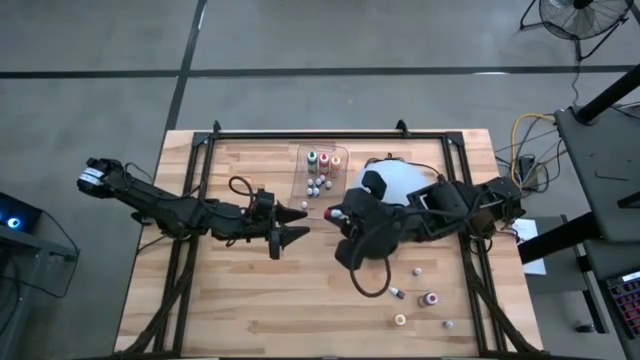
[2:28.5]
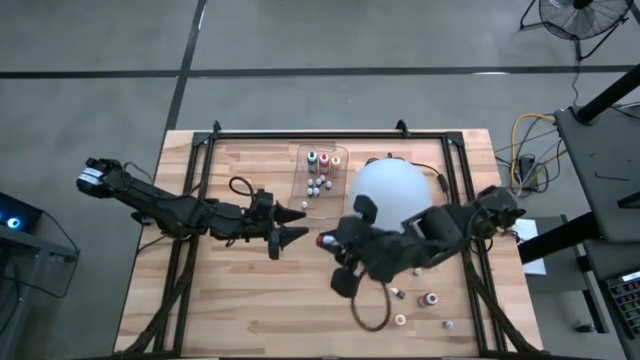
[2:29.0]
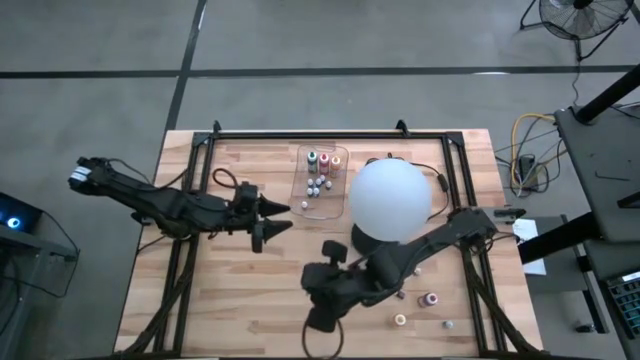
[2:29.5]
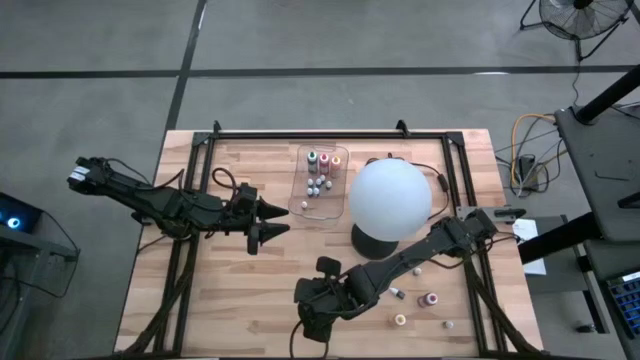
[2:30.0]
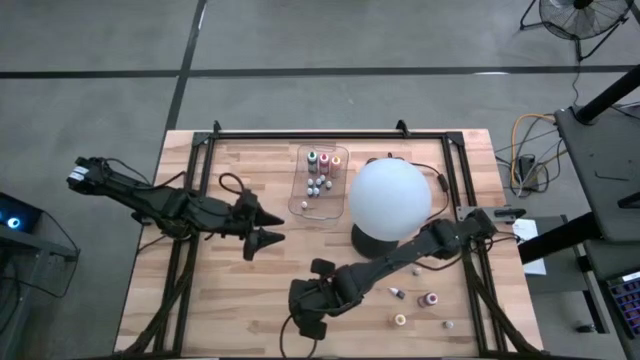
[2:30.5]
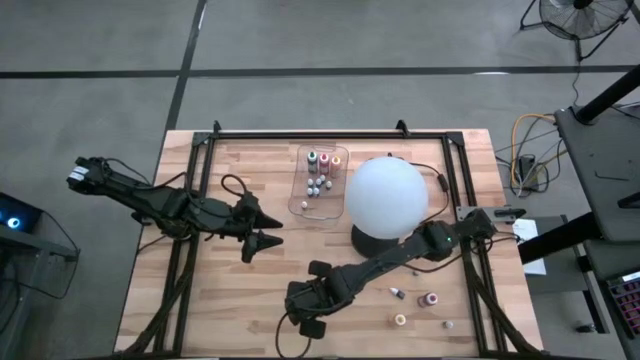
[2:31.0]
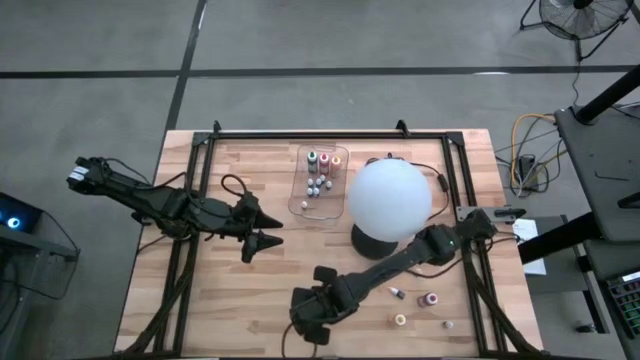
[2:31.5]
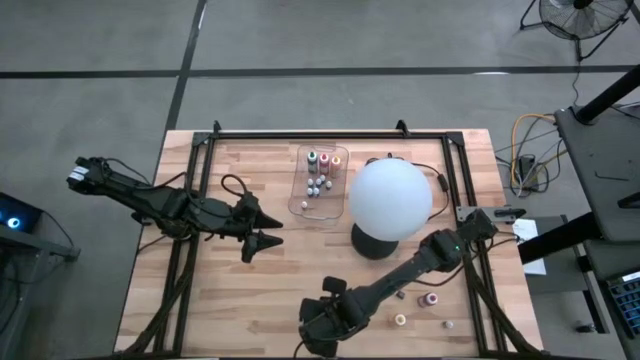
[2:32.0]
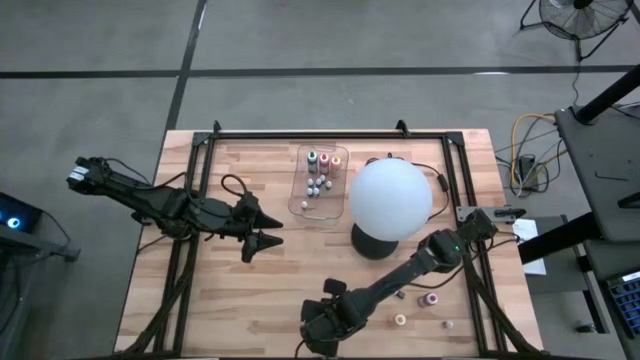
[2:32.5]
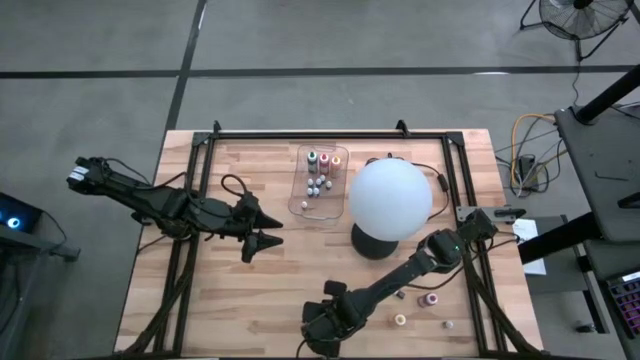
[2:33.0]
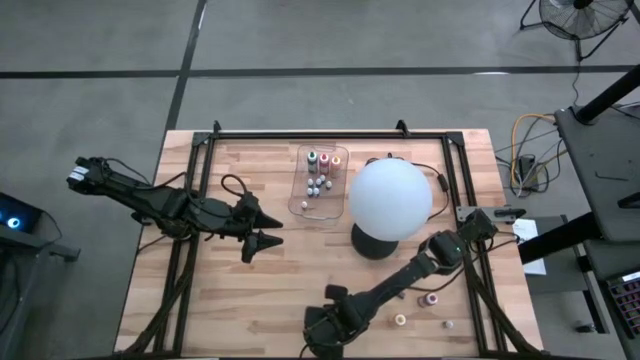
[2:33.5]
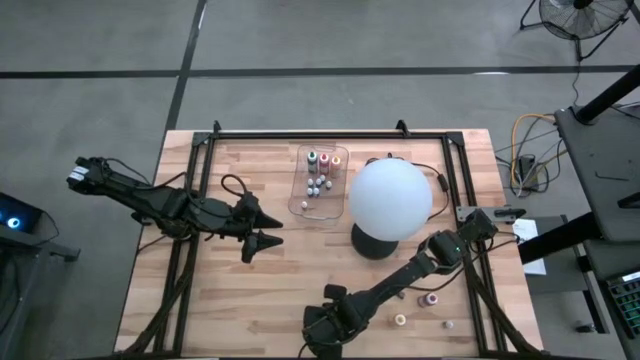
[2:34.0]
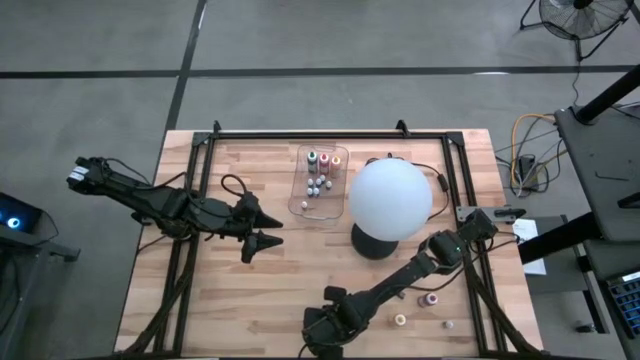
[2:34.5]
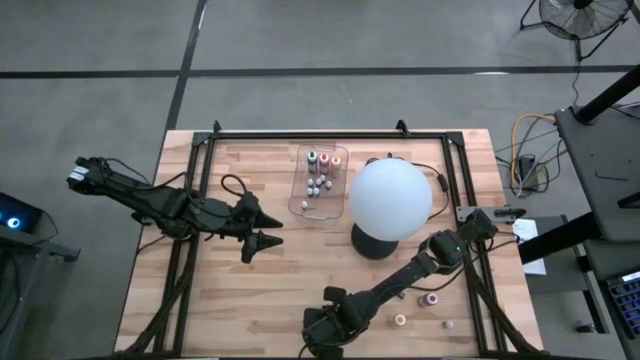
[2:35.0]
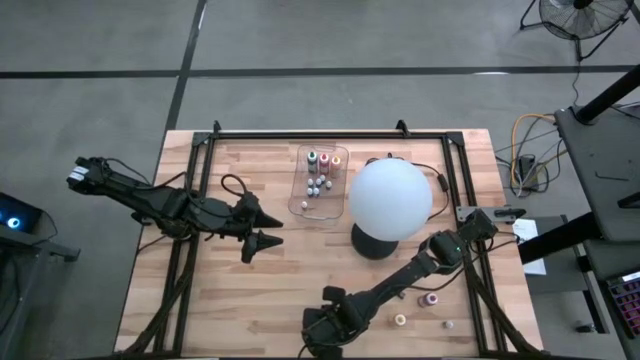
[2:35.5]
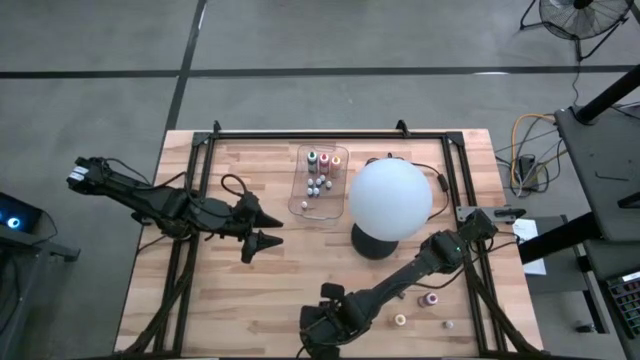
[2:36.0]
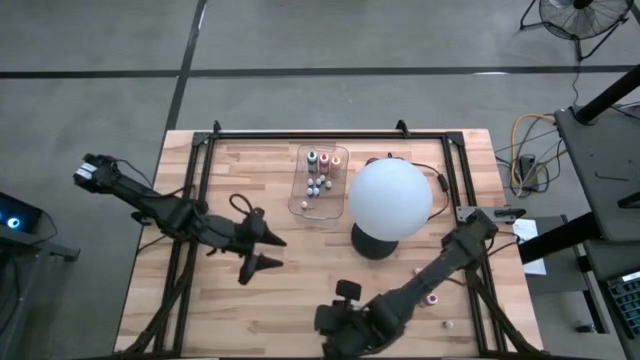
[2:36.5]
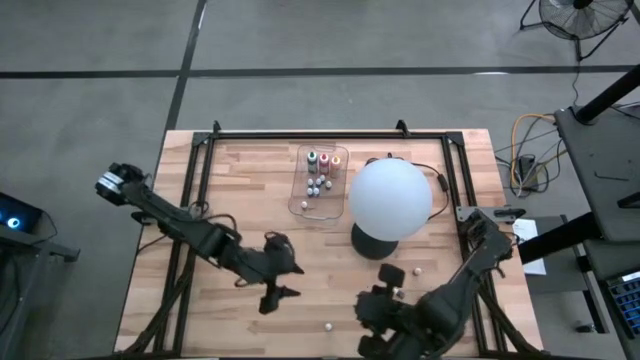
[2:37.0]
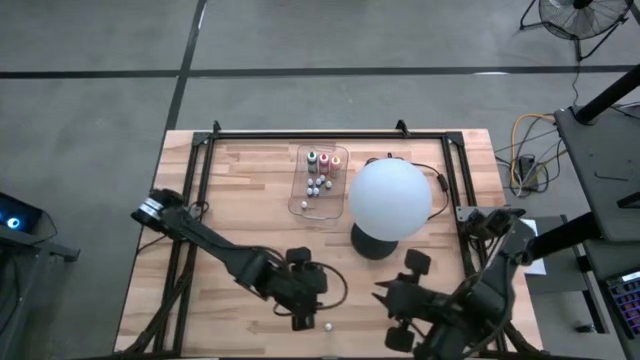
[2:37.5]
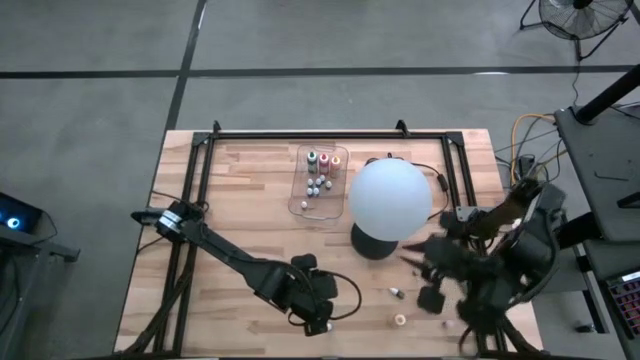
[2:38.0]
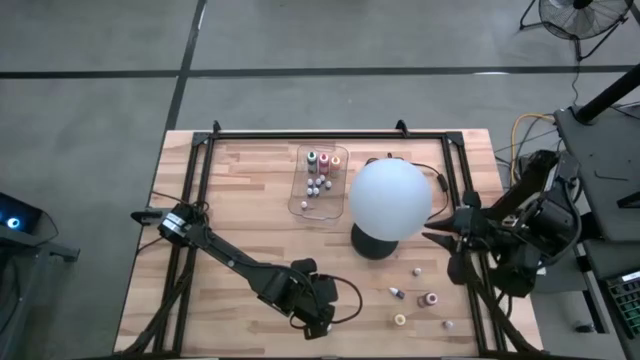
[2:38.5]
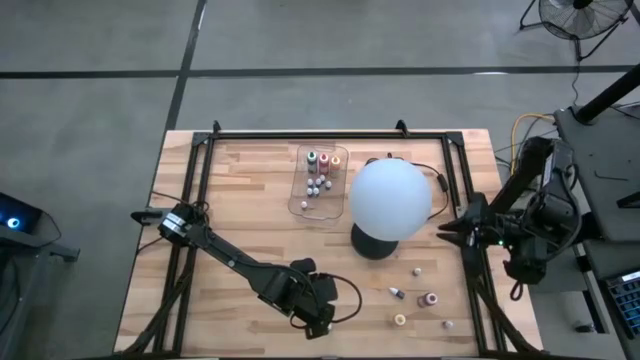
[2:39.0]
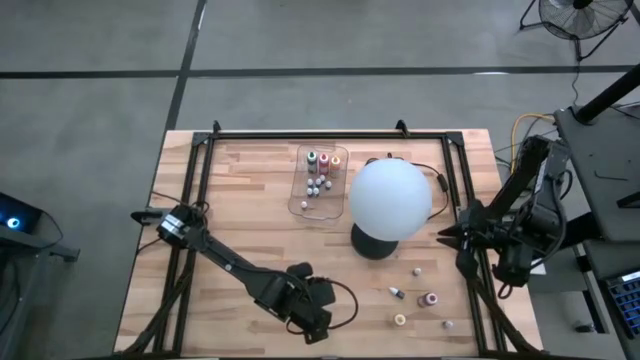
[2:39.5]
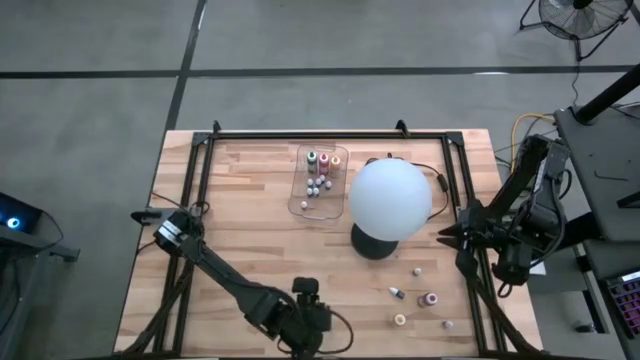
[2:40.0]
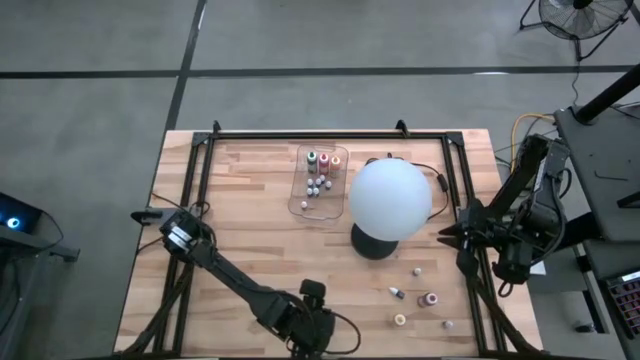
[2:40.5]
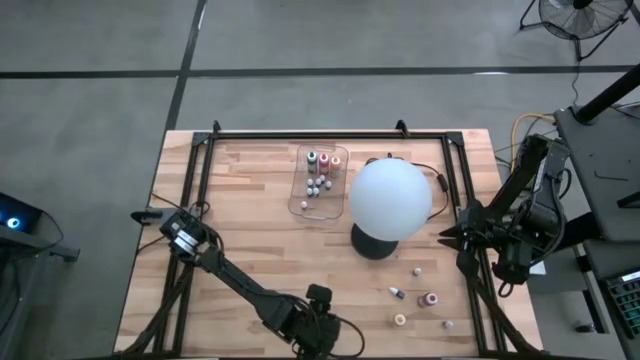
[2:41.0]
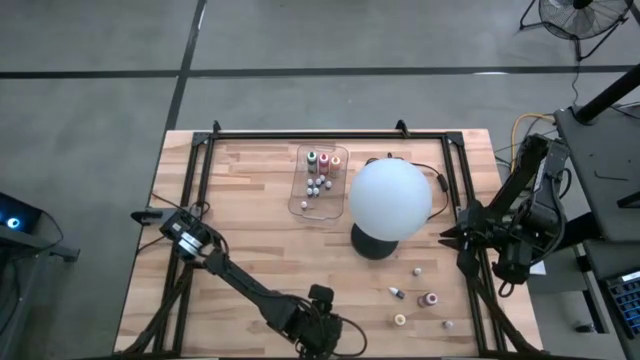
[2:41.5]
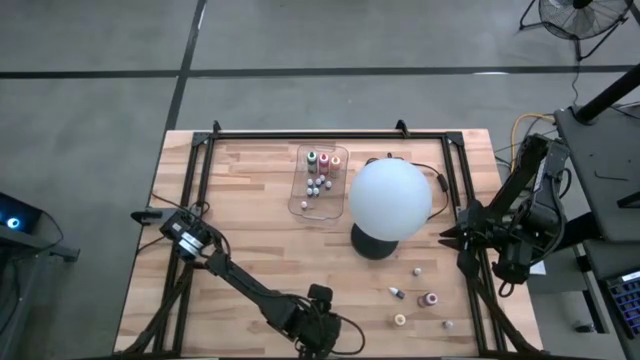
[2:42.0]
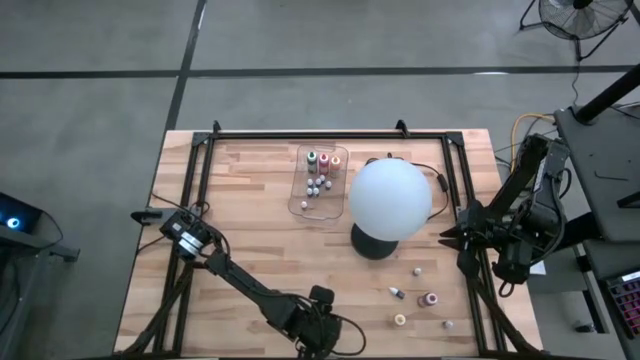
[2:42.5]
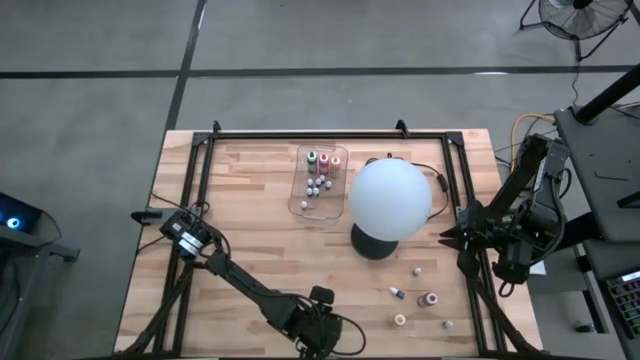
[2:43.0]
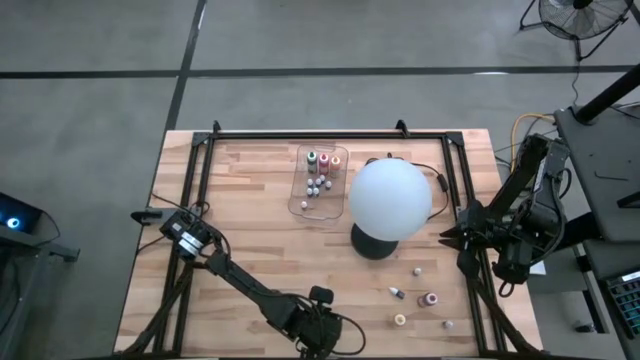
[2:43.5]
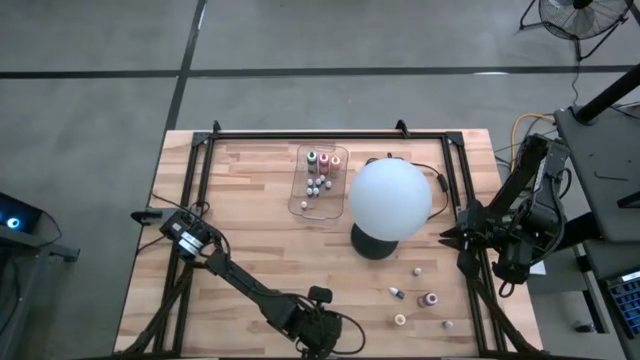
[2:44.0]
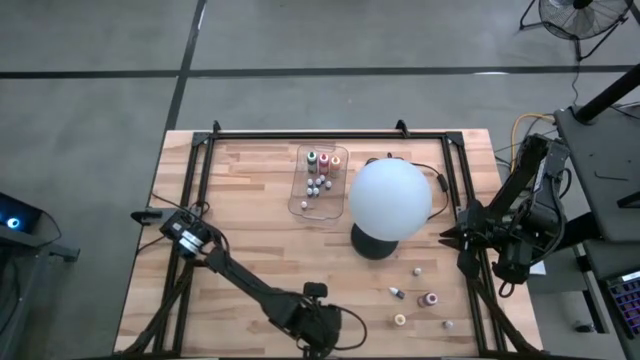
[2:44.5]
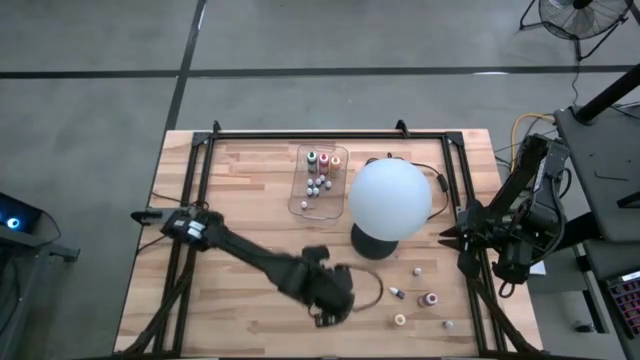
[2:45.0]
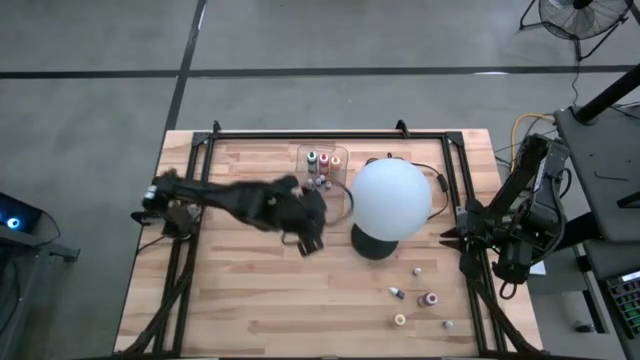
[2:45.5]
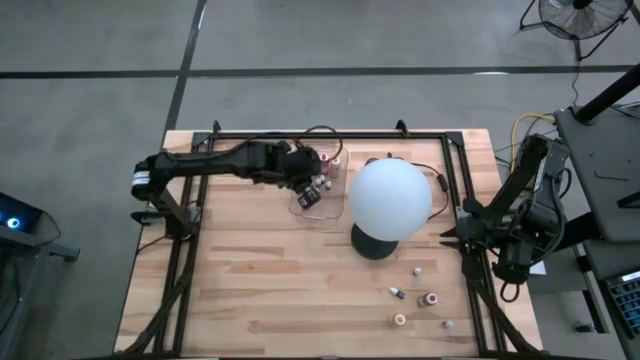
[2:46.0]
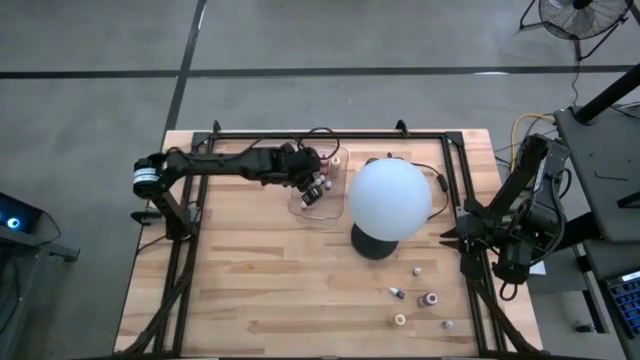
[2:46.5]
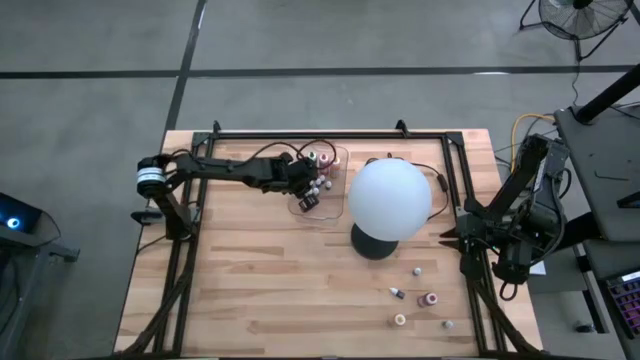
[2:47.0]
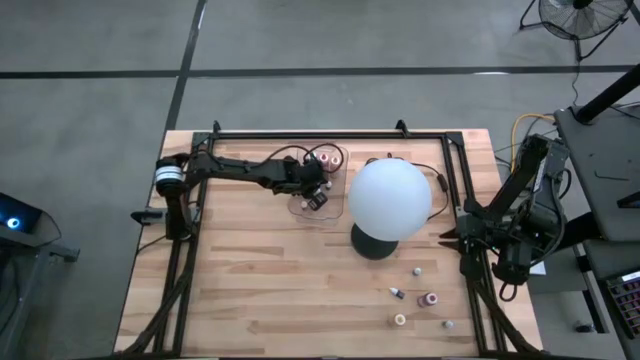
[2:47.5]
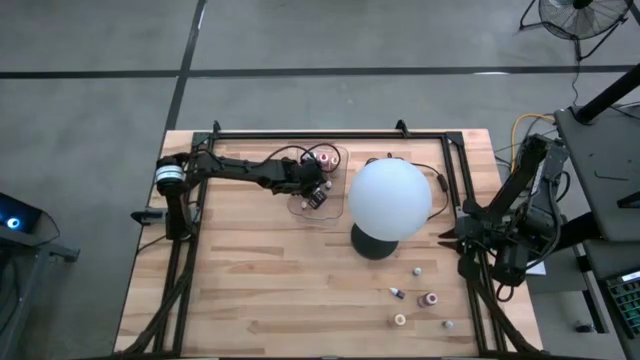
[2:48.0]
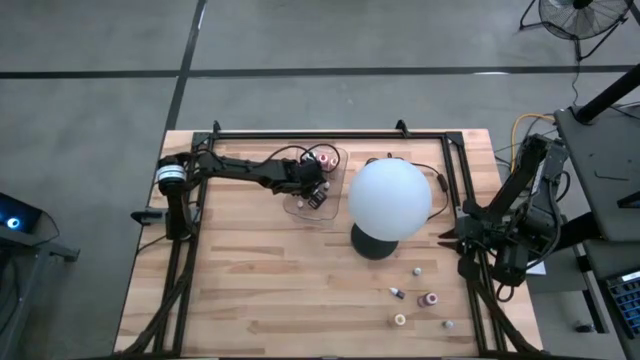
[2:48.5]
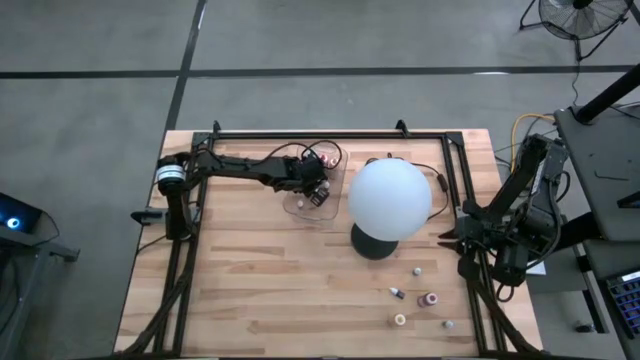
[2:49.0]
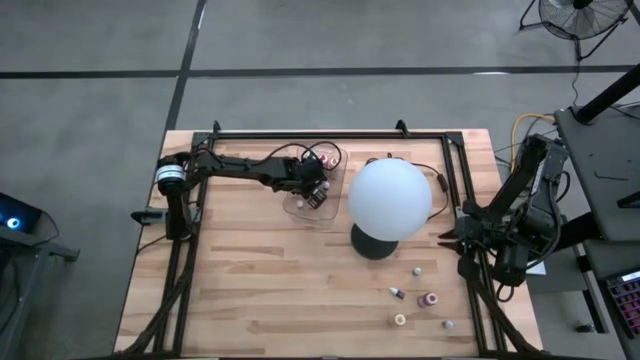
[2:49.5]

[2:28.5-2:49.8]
Task: Pick & Place food coloring
Put the small red food coloring bottle into the transparent bin
